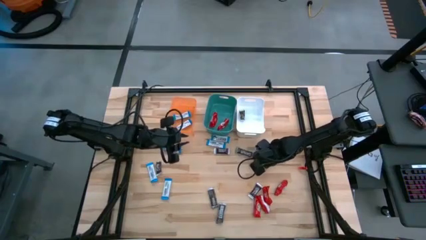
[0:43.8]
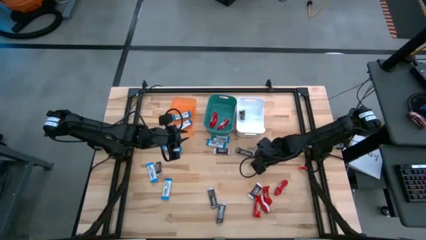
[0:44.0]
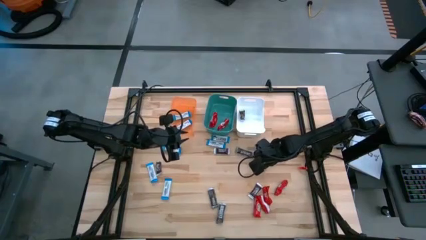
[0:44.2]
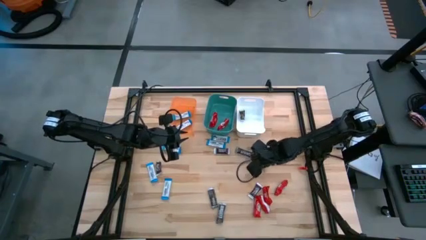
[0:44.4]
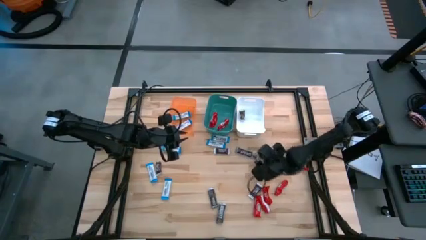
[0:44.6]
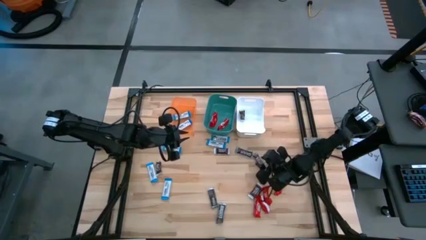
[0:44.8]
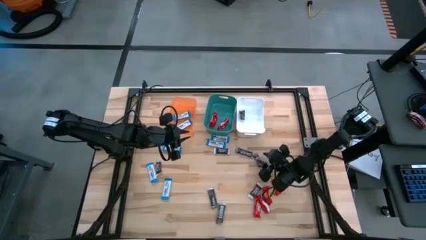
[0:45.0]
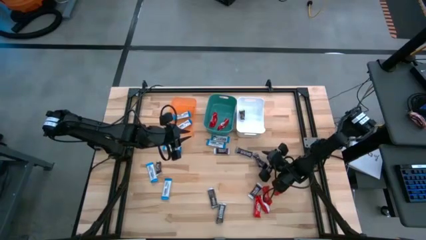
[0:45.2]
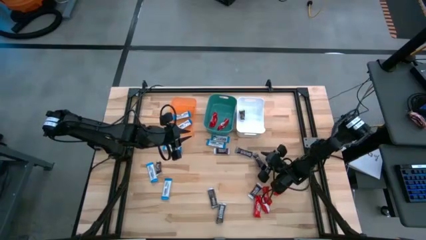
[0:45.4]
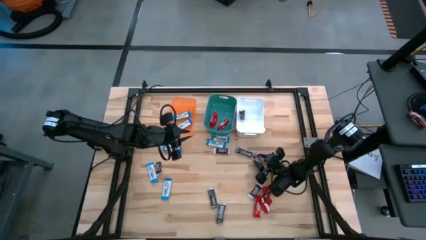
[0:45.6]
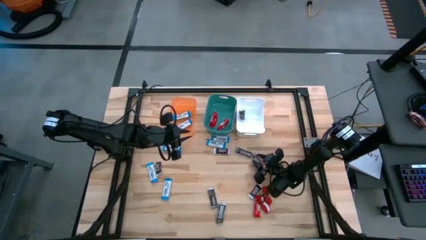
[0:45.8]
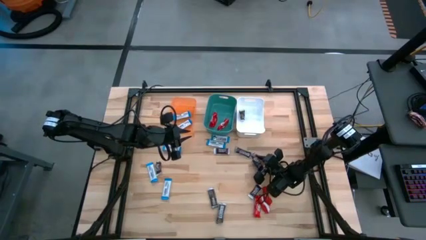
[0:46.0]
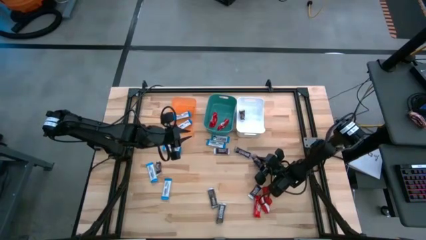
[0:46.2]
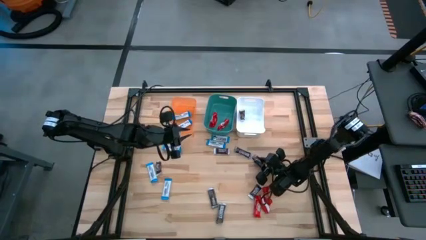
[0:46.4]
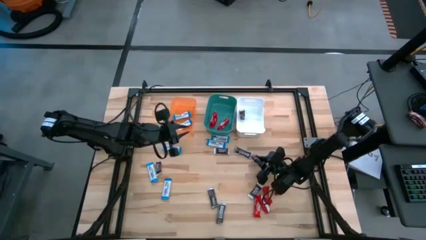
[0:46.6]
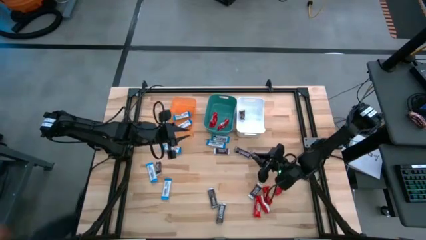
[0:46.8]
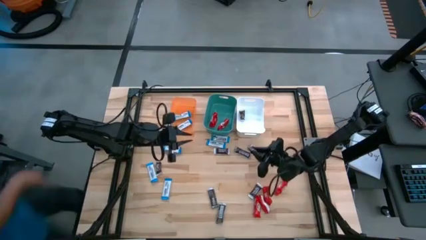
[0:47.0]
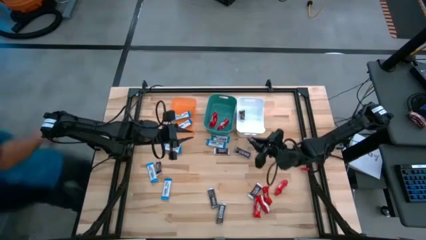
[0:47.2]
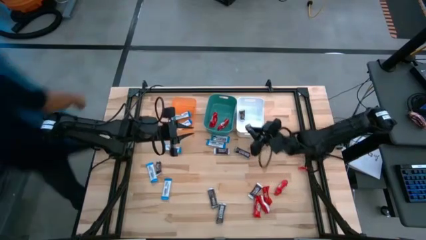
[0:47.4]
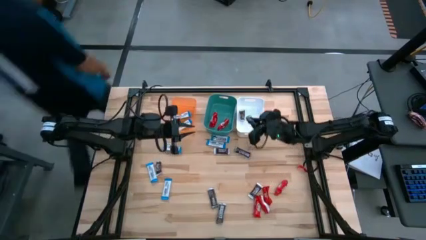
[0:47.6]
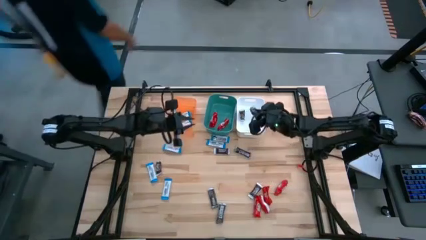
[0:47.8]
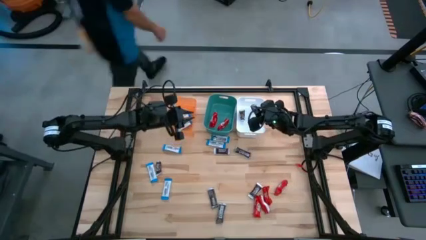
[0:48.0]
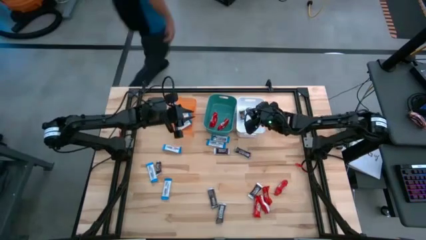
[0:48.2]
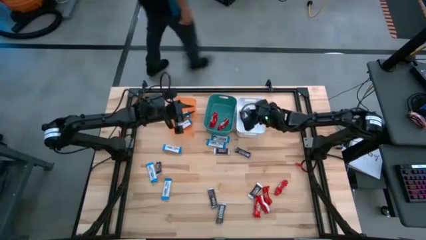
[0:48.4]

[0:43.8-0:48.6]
Task: Organize candy in baskets
Put the brown chocolate into the white bin

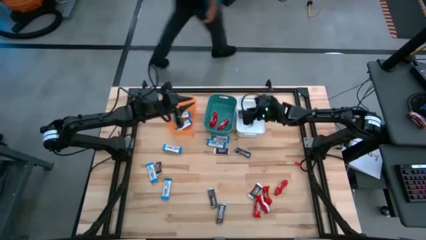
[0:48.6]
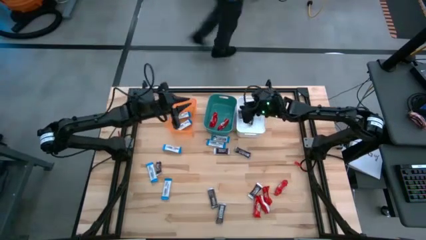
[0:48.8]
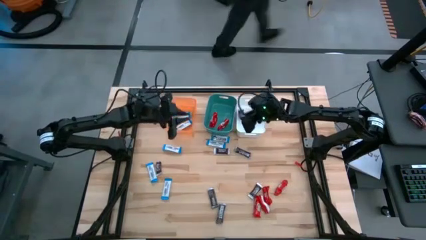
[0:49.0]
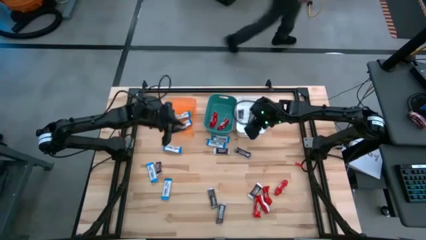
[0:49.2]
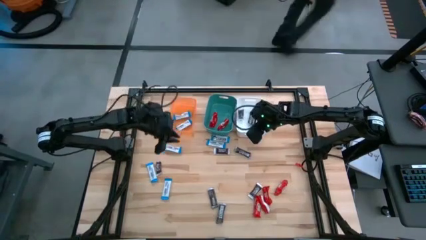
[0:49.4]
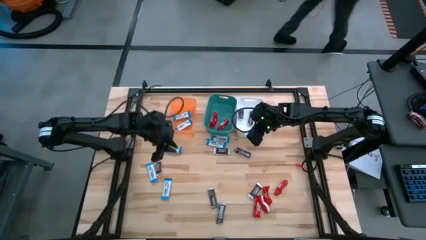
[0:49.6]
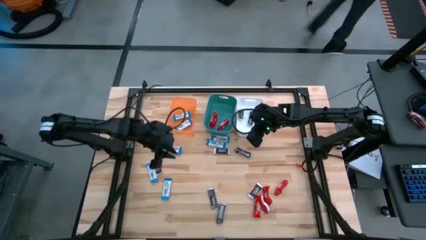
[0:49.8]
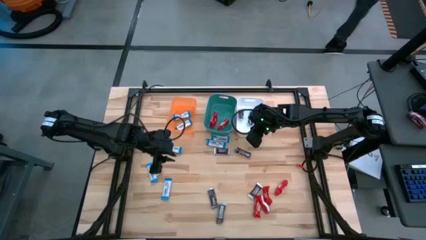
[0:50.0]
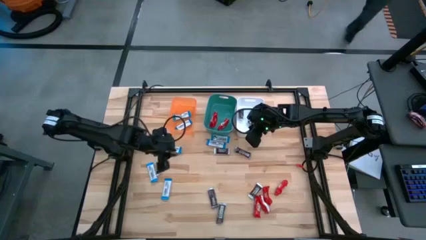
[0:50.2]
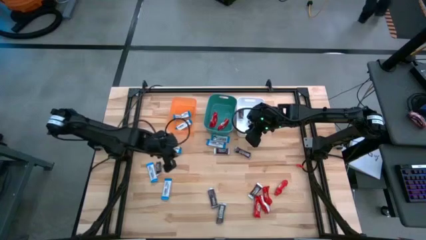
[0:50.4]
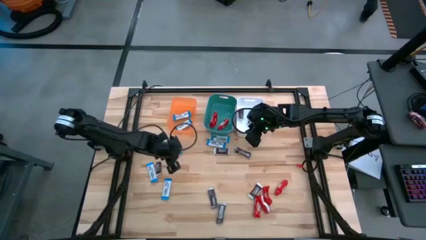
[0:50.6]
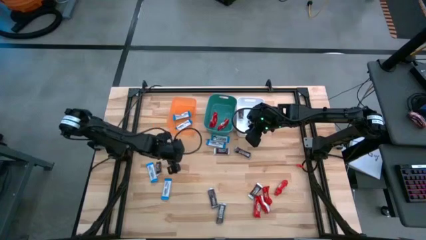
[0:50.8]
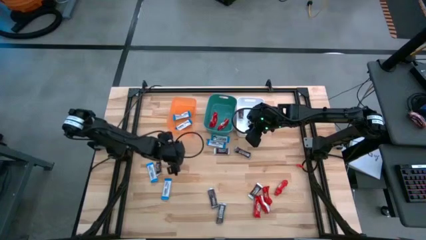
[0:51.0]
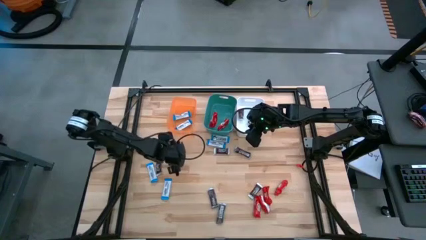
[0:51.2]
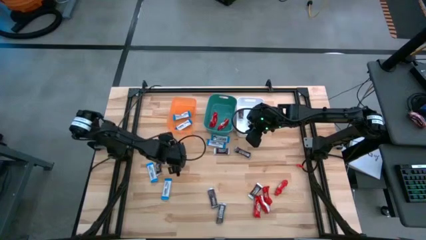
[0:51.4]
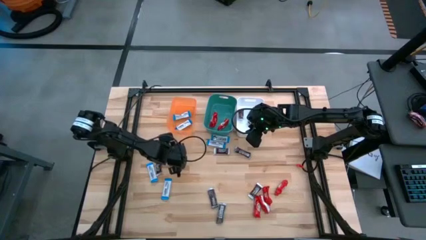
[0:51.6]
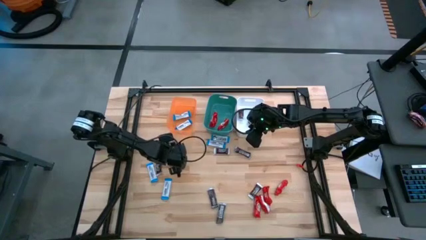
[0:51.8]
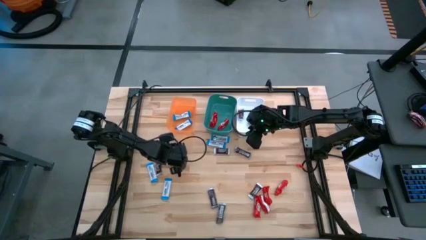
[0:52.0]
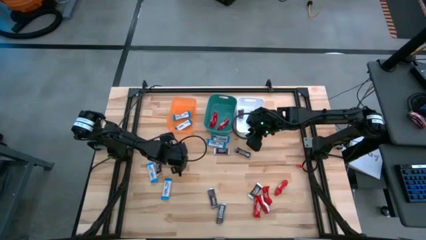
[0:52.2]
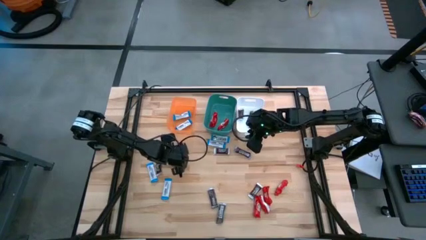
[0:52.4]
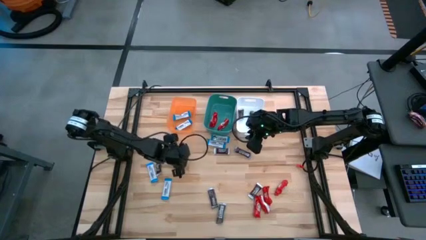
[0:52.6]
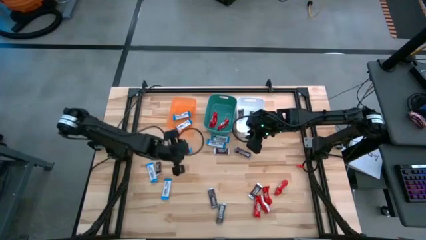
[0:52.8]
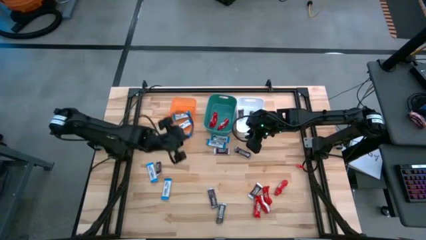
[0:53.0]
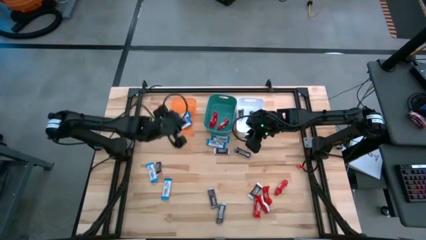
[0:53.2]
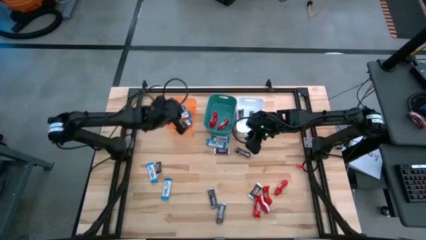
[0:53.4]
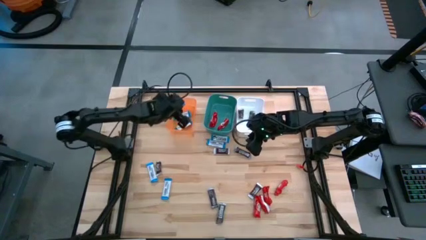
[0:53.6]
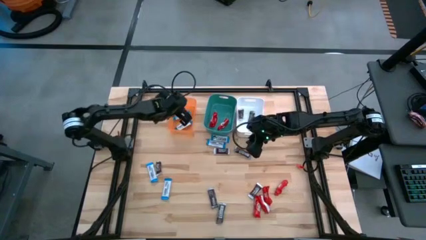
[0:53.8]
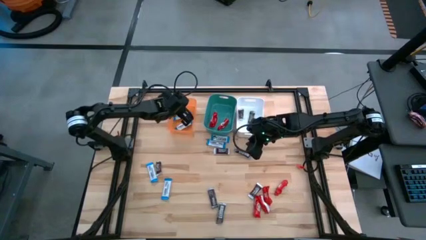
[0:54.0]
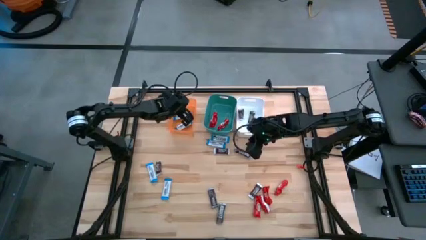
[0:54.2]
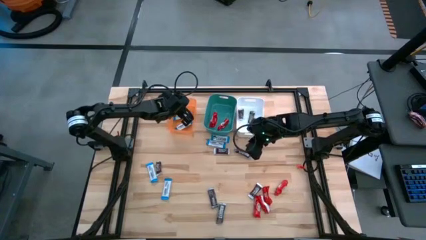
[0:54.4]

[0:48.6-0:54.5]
Put the white chocolate into the orange bin

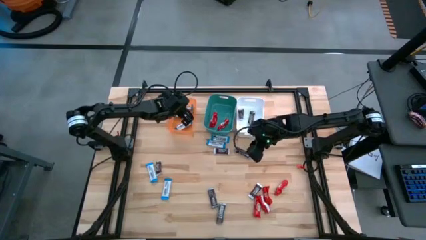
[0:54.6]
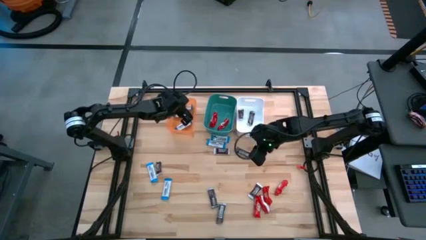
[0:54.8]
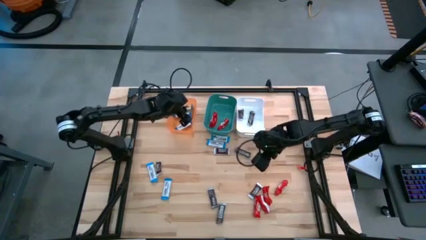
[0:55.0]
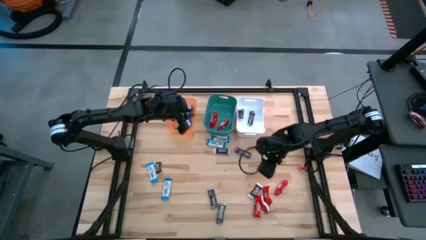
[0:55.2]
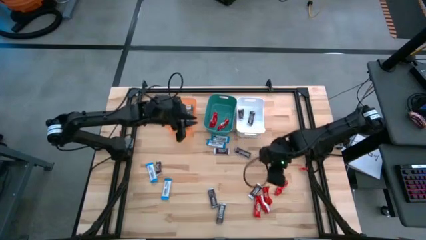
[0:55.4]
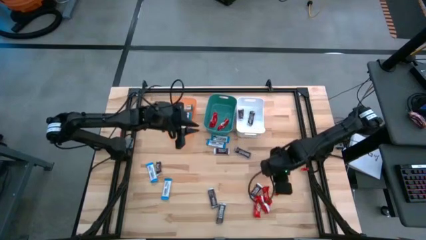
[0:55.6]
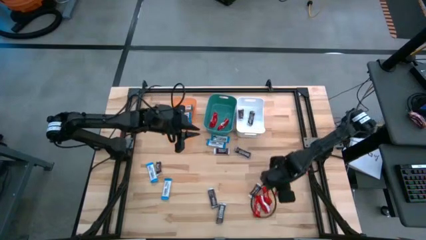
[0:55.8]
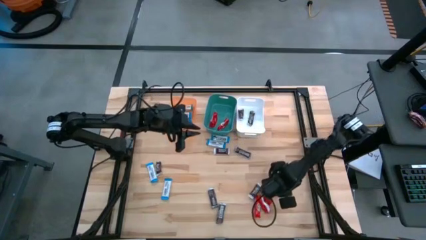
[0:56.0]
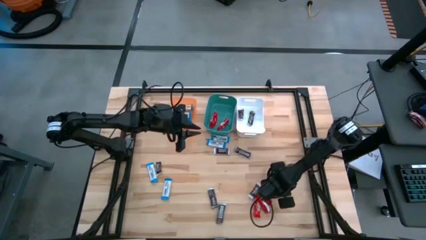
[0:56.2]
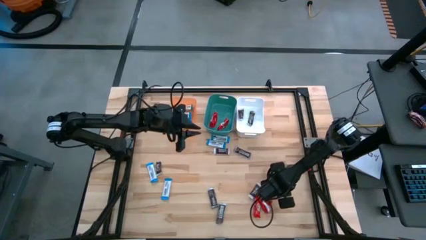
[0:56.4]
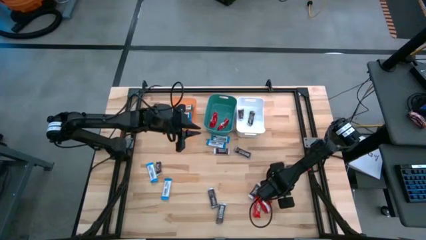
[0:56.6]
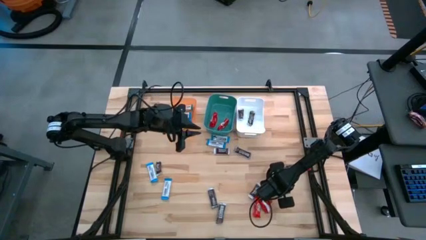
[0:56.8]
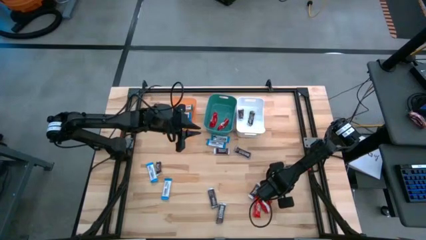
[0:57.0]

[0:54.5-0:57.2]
Put the red chocolate into the green bin

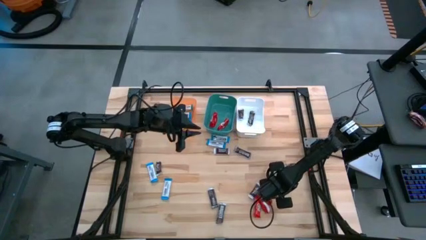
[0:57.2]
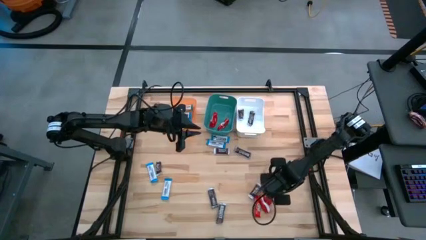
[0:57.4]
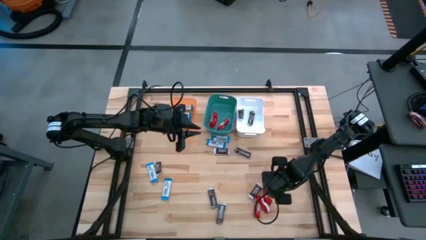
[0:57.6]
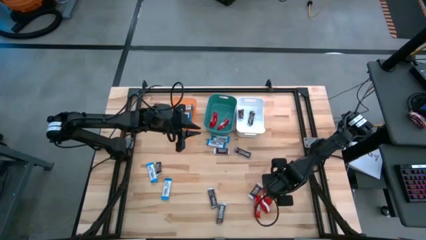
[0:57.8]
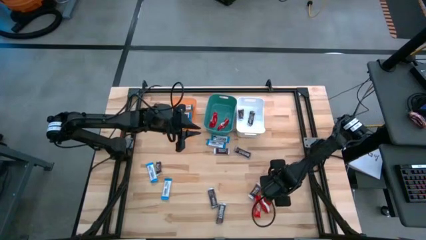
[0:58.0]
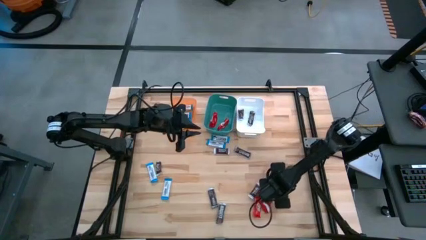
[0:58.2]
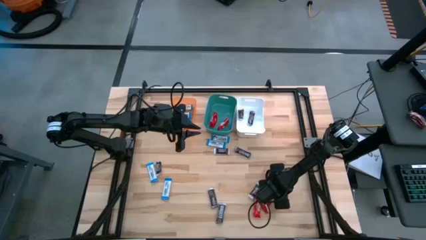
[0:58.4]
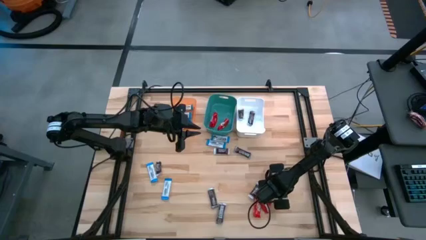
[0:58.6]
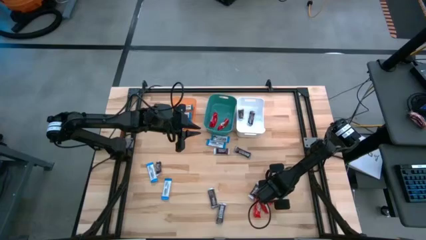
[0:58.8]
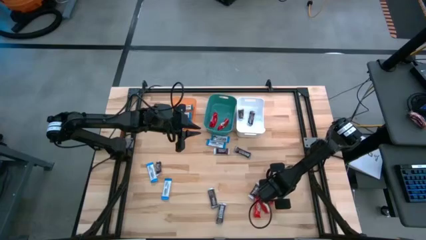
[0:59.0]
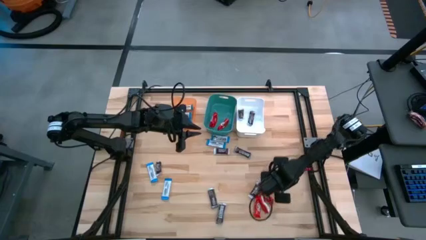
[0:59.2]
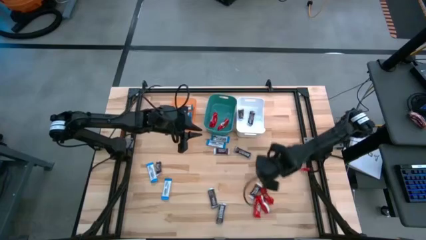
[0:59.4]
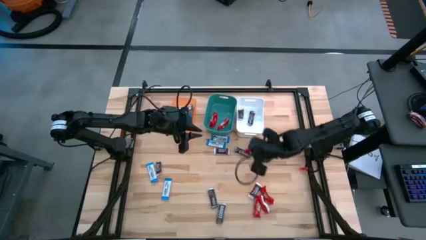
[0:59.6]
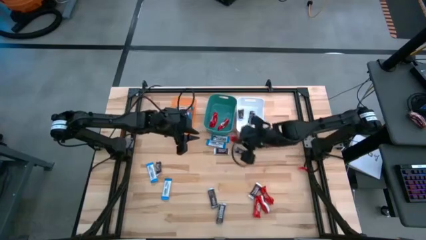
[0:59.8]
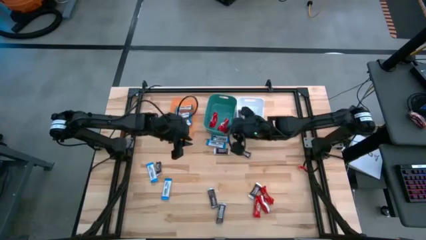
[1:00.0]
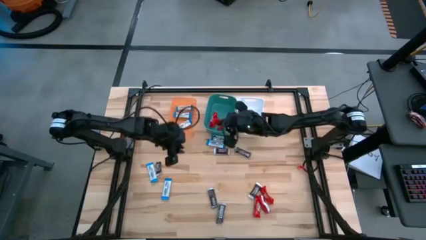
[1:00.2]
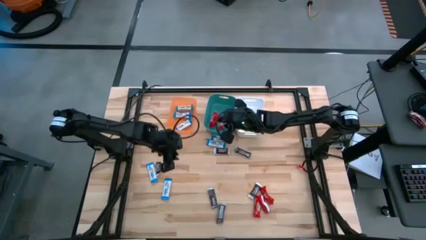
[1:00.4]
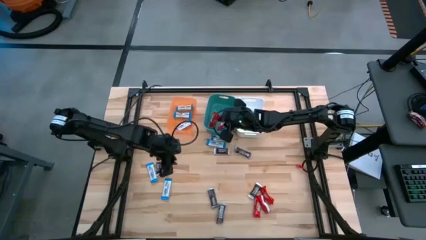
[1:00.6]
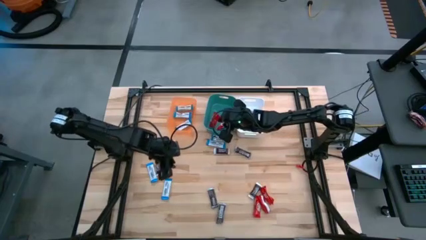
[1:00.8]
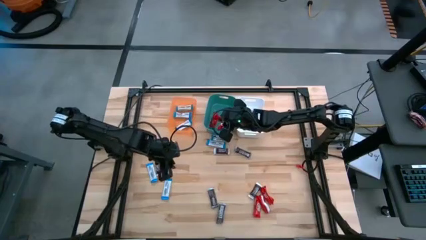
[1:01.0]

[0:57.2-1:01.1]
Put the red chocolate into the green bin
